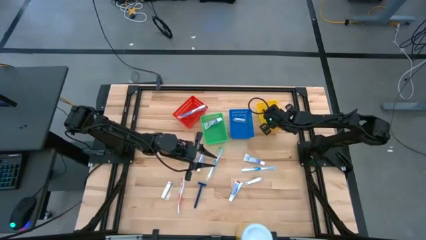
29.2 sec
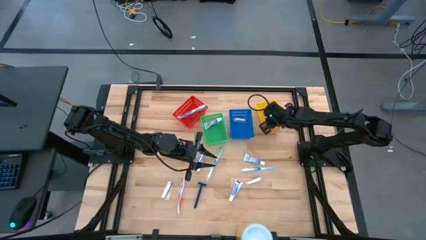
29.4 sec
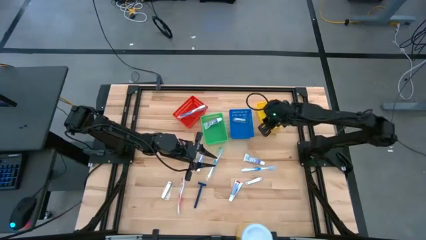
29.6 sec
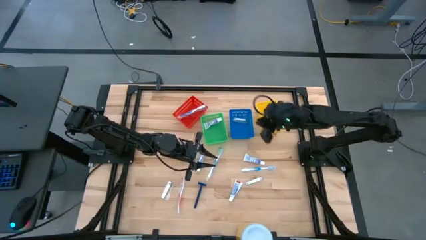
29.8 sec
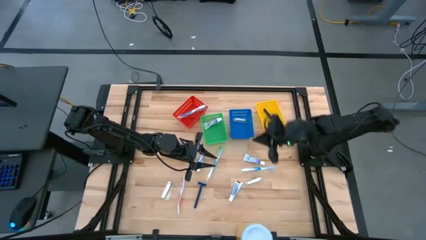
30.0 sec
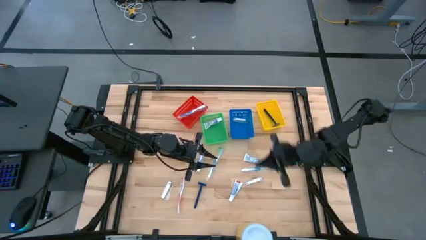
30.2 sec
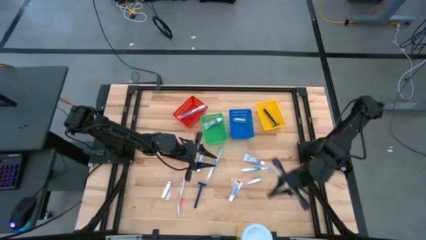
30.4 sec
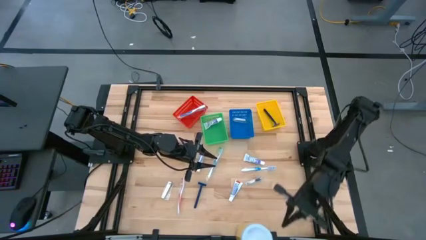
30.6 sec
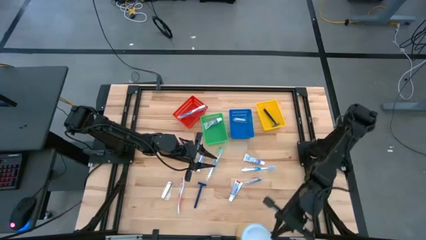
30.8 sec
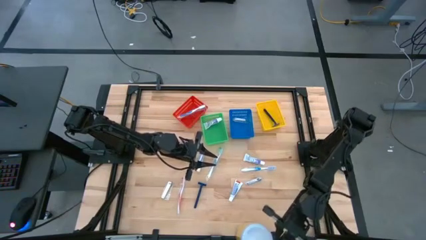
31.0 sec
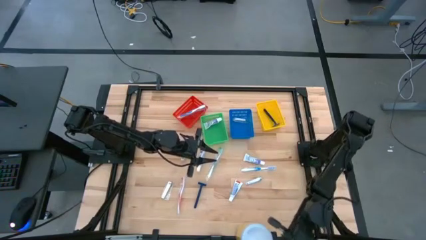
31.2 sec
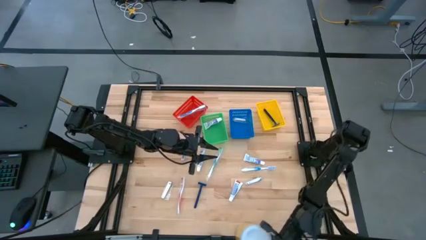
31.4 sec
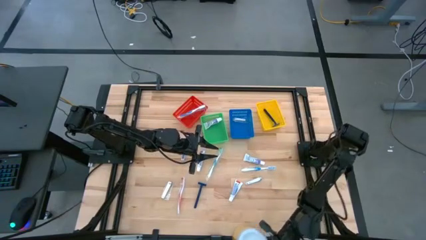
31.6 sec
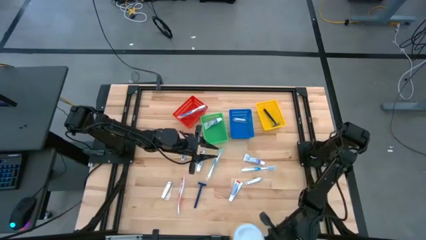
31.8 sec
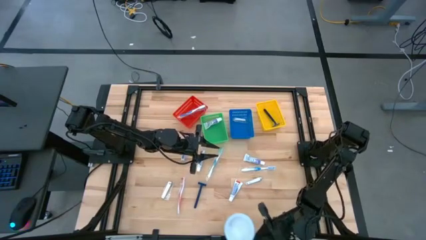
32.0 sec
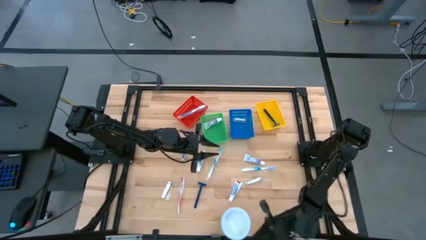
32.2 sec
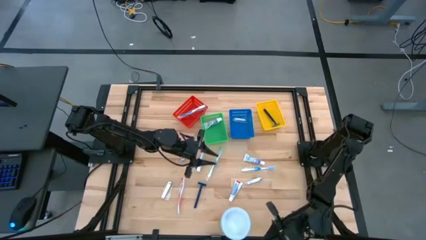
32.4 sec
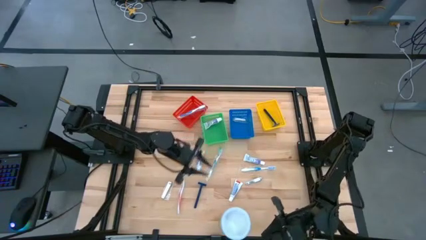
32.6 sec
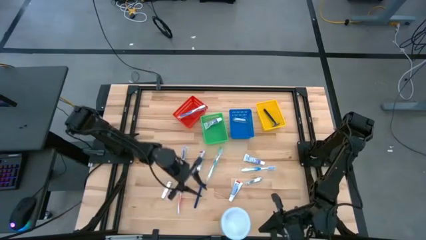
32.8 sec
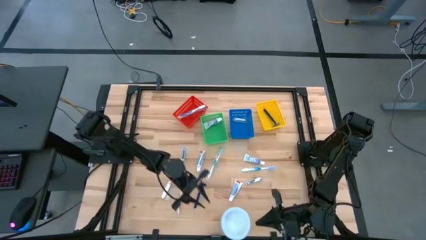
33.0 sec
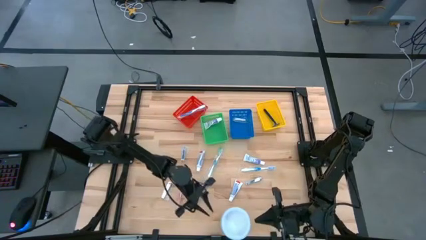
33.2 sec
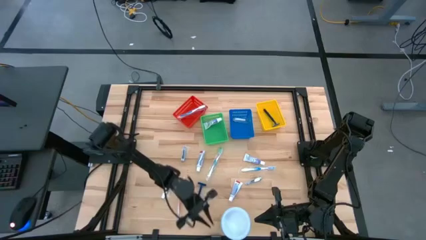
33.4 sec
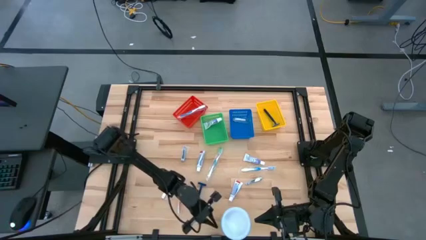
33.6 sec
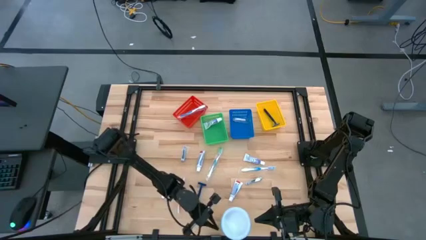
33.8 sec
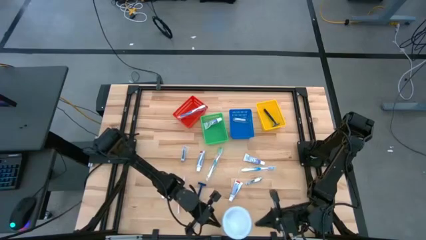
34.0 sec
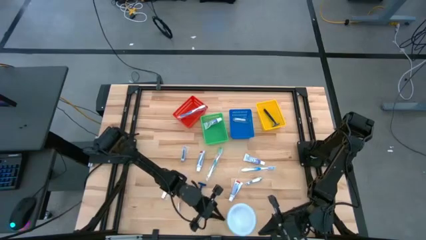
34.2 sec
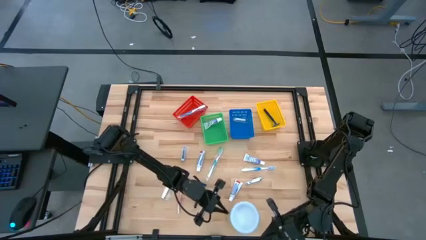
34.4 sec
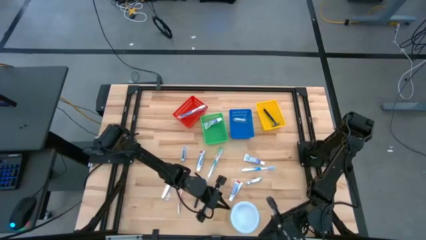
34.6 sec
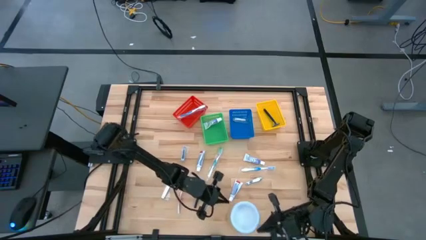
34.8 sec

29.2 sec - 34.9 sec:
Task: Pick & Place Travel size toiletries
Adjust the disinfectant wipes

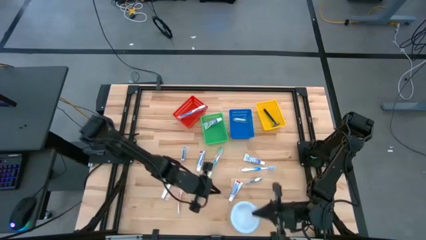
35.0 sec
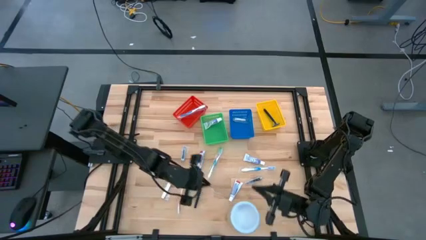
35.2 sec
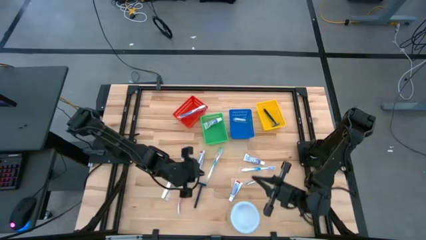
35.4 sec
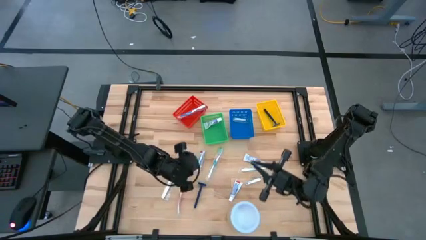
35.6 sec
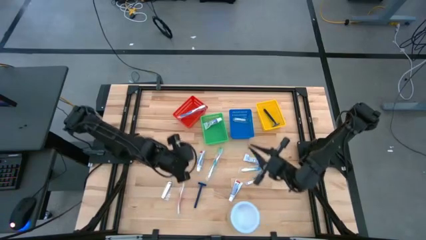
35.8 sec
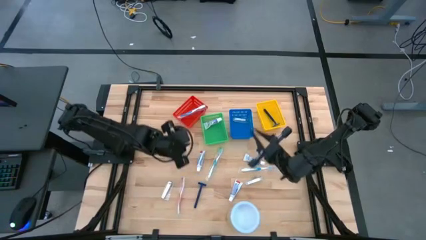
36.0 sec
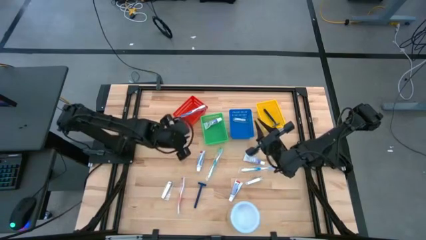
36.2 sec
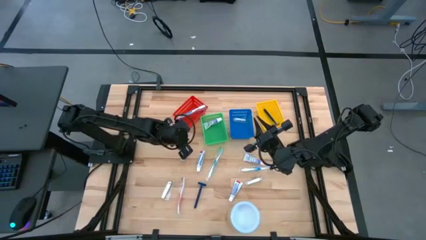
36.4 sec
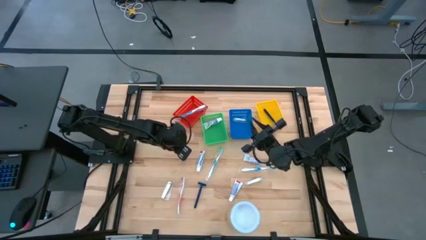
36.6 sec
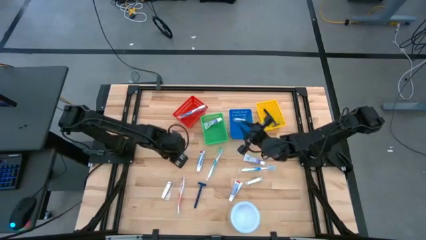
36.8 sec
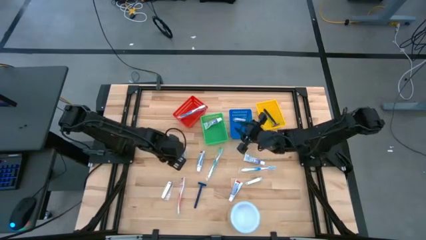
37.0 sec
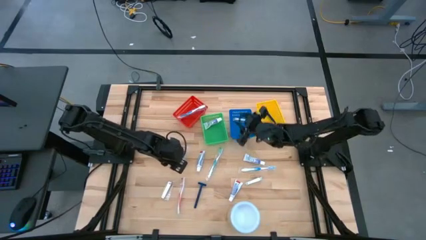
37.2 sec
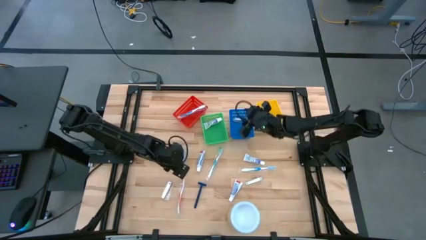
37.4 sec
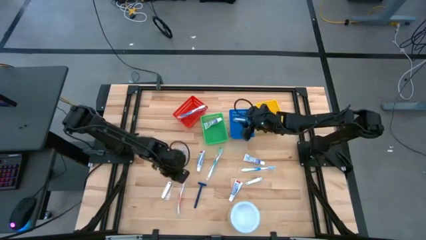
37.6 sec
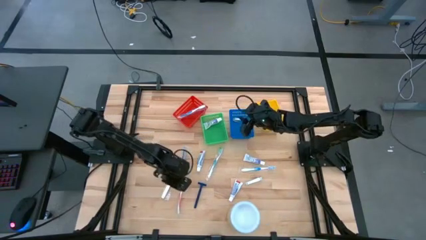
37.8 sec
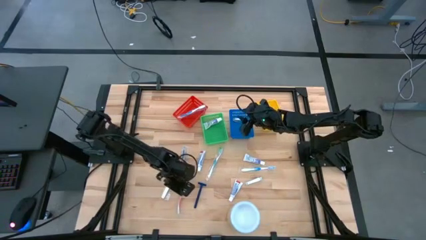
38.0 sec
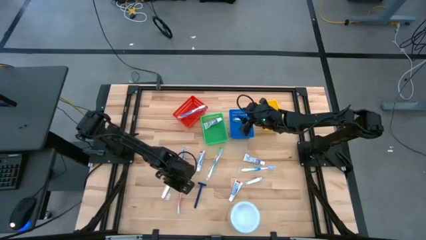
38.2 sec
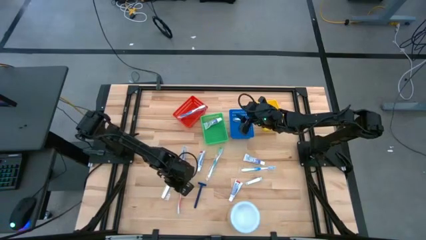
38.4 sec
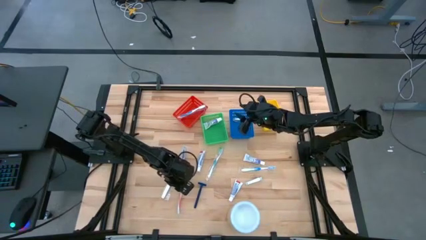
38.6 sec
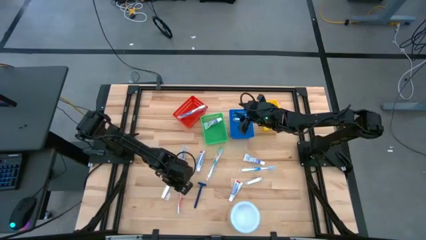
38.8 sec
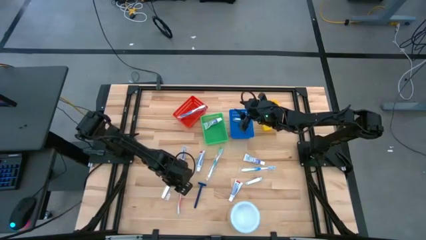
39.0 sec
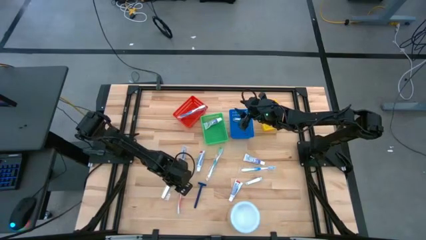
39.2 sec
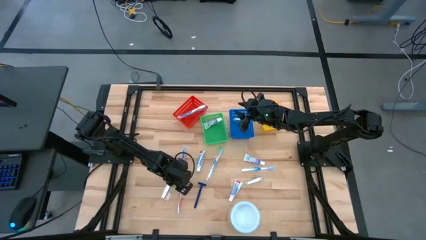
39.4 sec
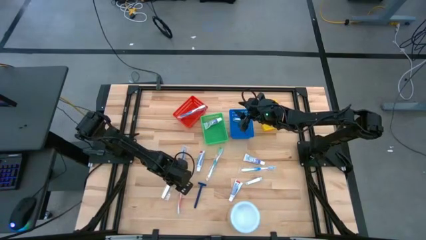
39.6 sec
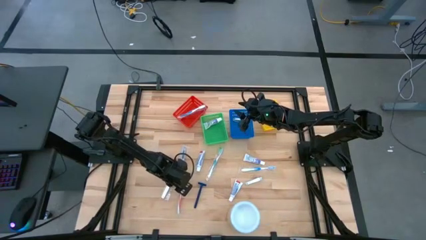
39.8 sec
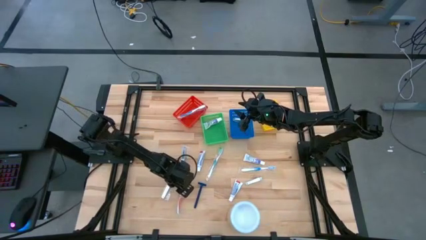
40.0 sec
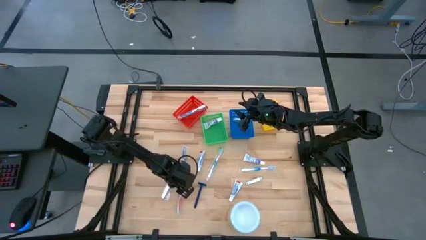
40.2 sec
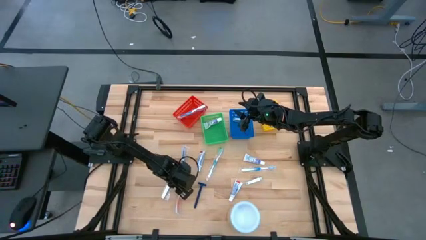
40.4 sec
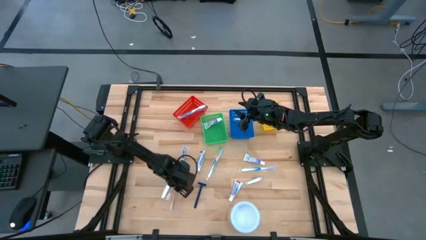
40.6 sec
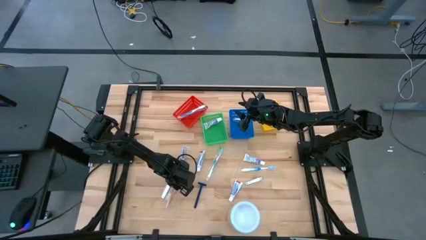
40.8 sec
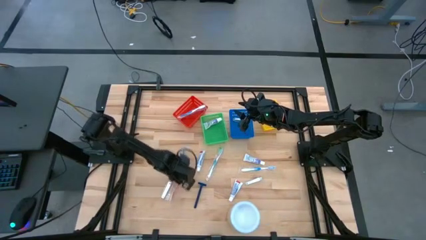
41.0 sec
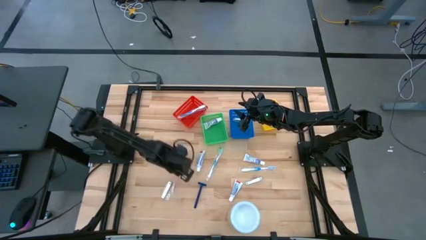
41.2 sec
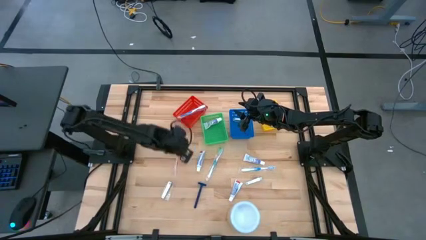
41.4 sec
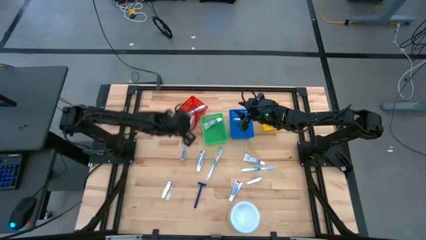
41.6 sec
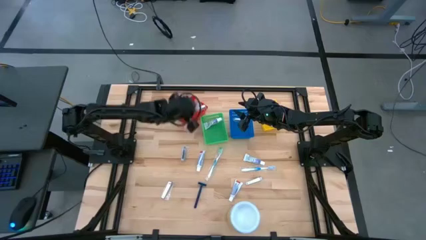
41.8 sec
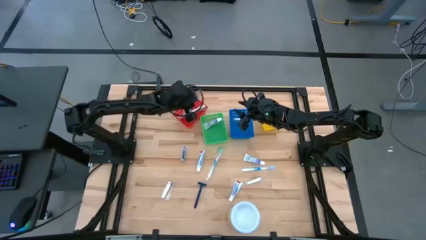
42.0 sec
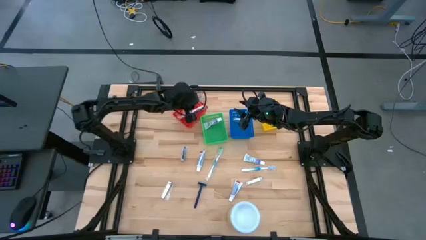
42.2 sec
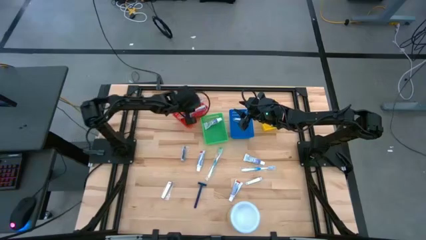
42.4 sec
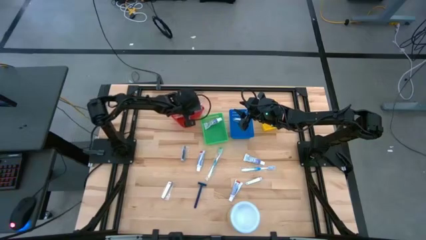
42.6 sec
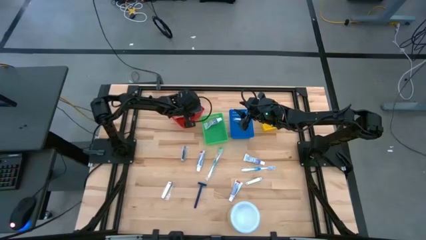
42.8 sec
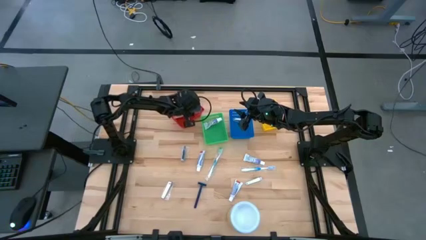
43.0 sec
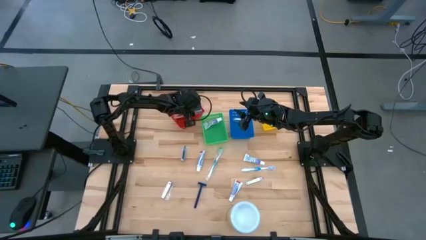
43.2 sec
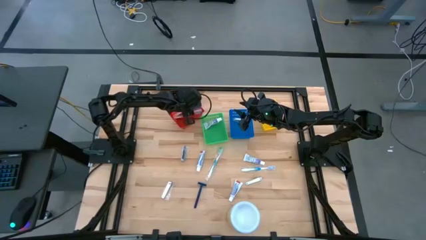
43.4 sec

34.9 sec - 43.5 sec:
Put the orange toothbrush into the red bin

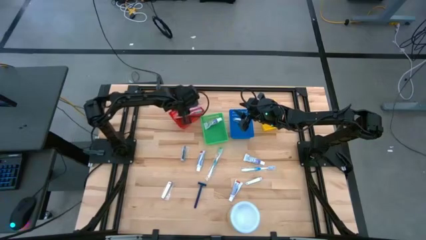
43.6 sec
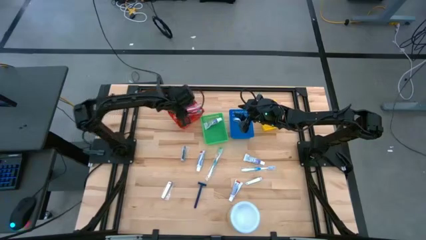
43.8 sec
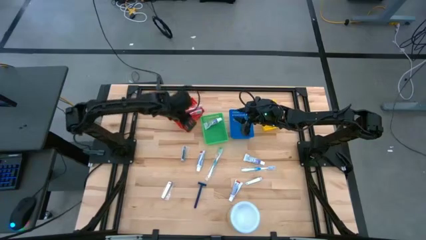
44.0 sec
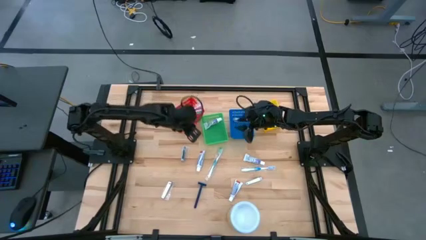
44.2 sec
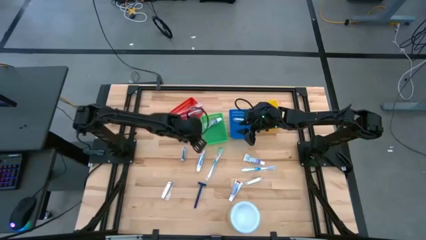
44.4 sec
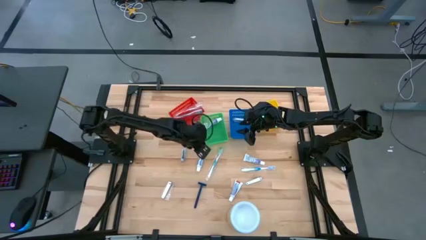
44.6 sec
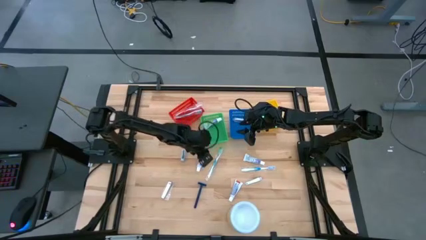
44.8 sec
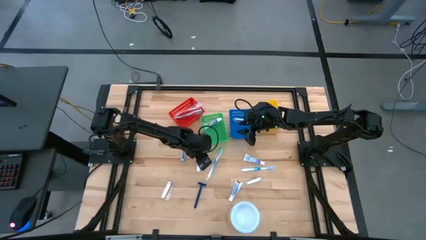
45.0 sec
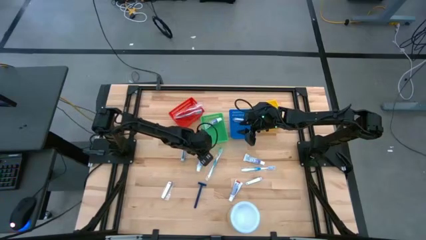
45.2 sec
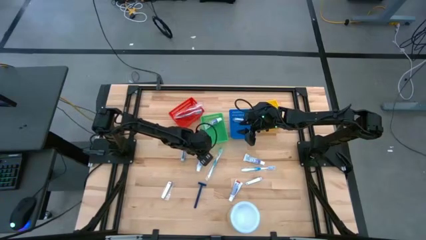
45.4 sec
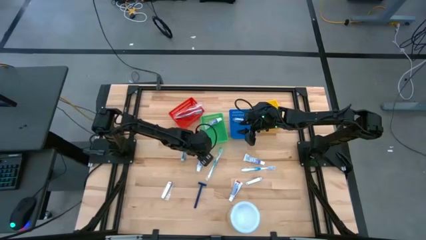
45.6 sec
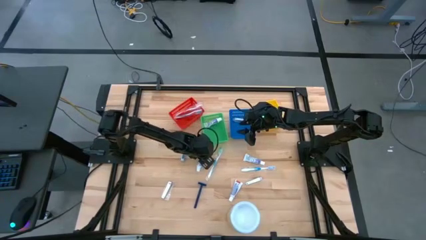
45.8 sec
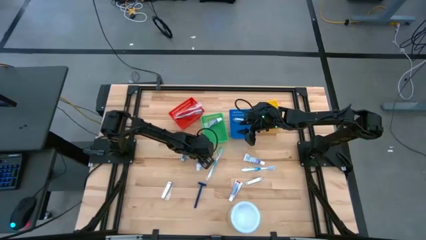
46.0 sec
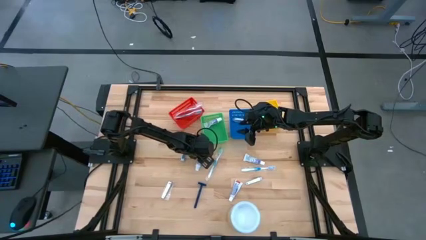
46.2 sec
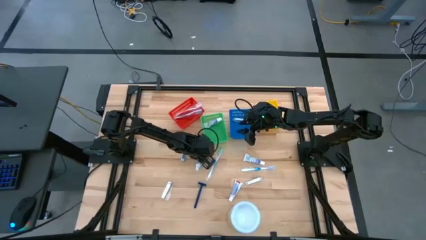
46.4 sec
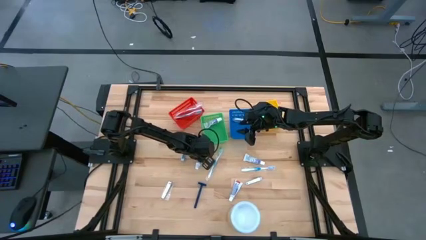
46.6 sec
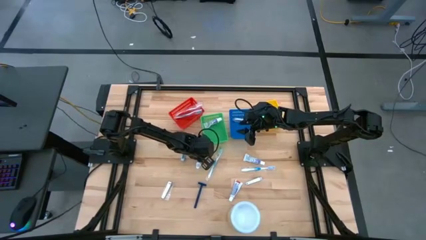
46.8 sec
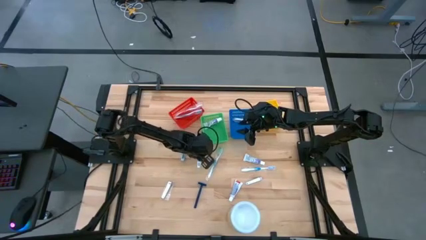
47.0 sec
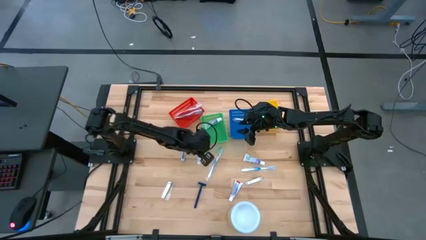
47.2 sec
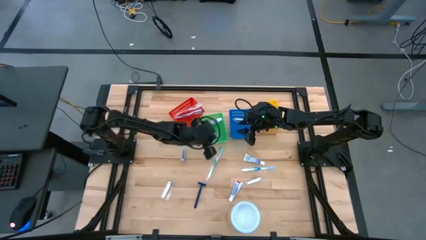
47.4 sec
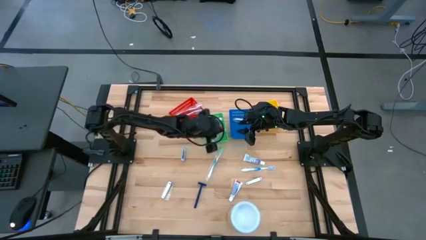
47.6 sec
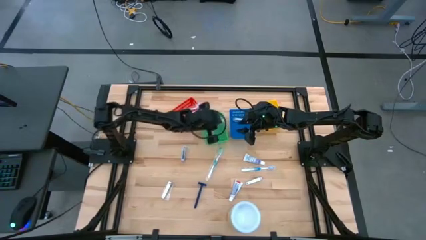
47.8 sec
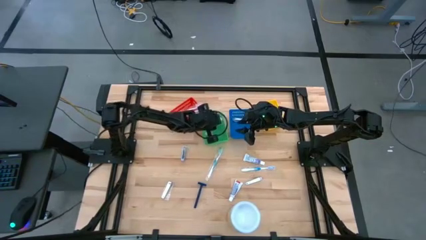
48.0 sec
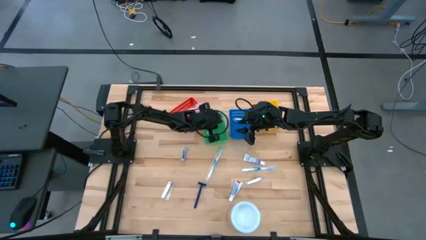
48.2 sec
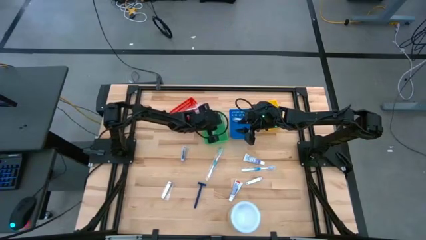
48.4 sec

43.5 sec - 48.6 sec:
Put the white toothpaste into the green bin
